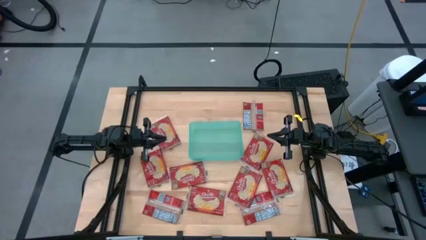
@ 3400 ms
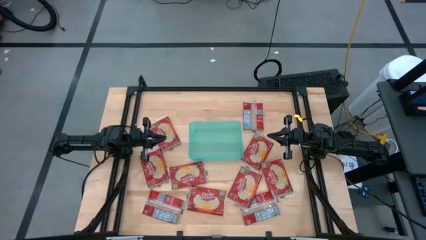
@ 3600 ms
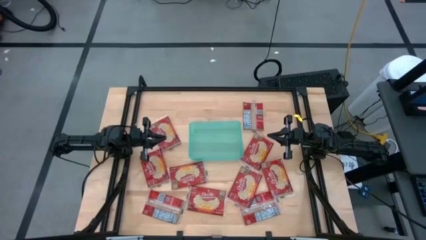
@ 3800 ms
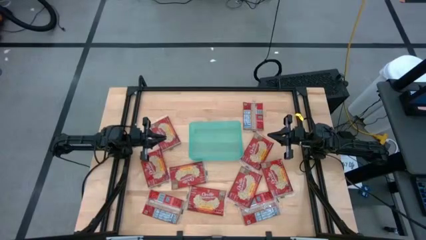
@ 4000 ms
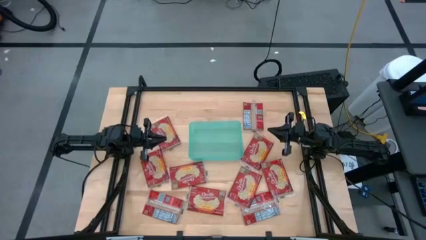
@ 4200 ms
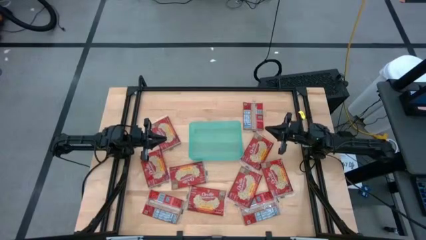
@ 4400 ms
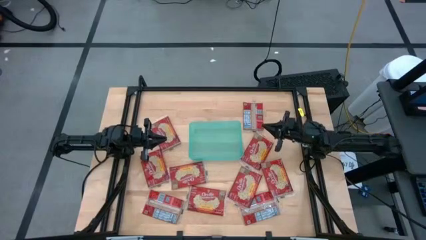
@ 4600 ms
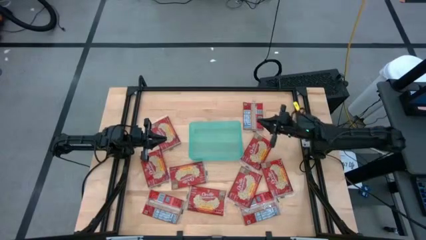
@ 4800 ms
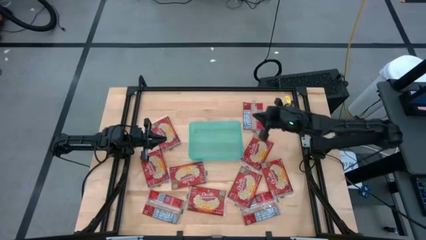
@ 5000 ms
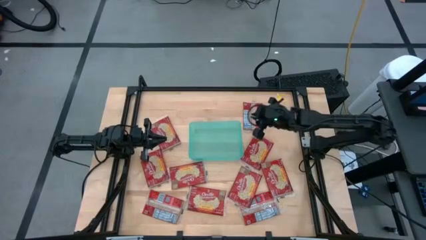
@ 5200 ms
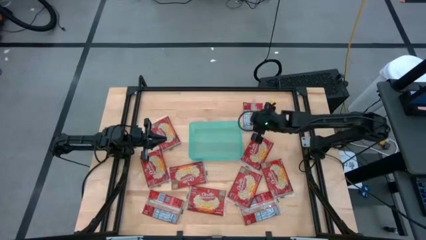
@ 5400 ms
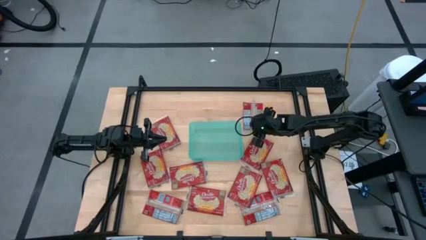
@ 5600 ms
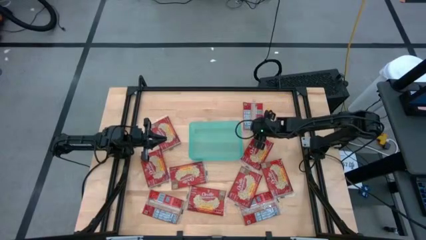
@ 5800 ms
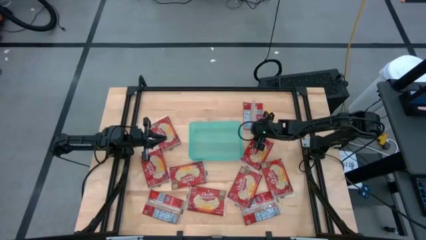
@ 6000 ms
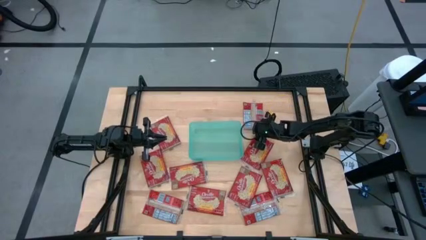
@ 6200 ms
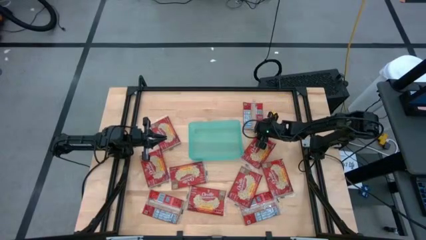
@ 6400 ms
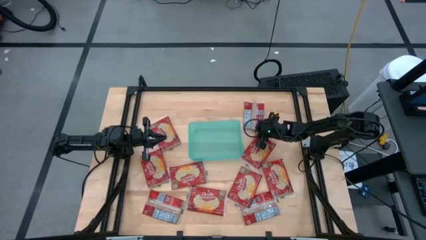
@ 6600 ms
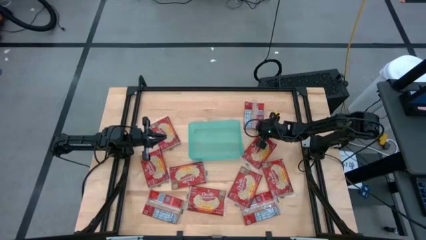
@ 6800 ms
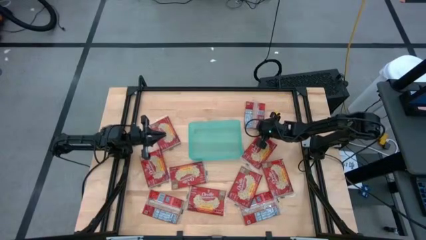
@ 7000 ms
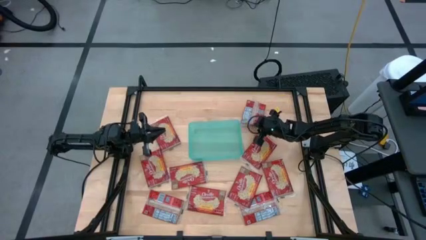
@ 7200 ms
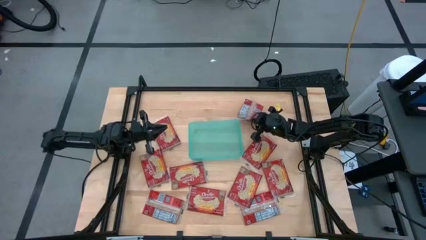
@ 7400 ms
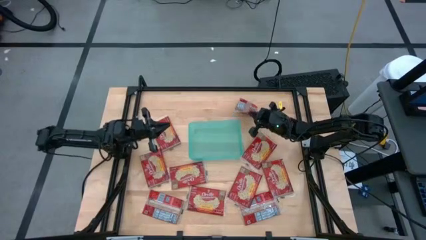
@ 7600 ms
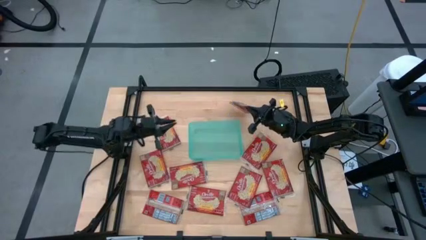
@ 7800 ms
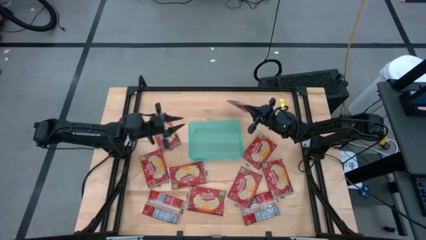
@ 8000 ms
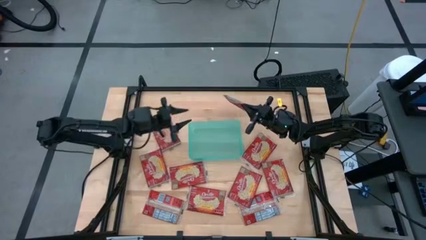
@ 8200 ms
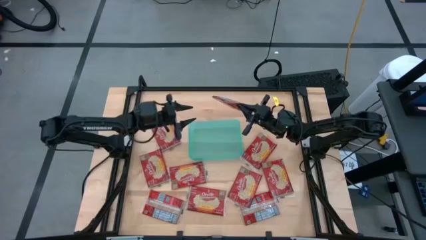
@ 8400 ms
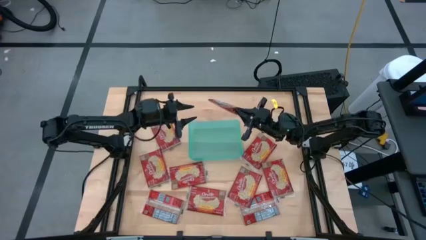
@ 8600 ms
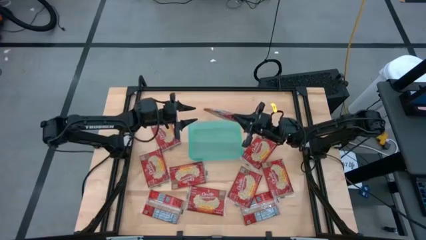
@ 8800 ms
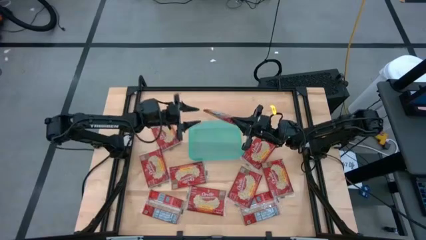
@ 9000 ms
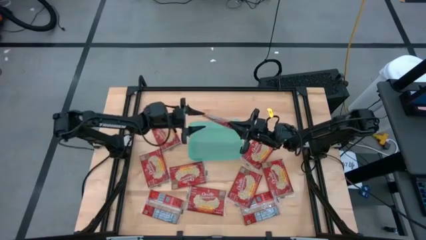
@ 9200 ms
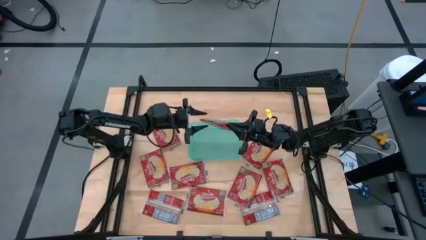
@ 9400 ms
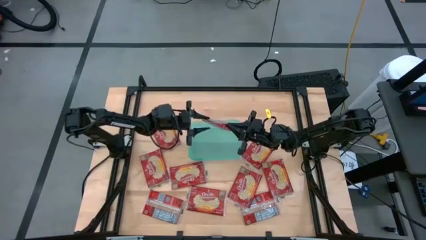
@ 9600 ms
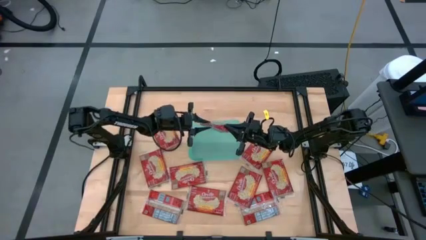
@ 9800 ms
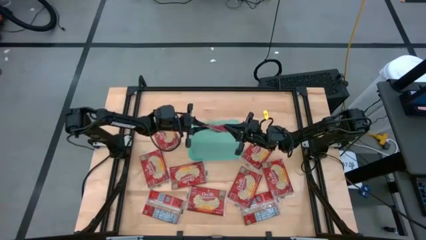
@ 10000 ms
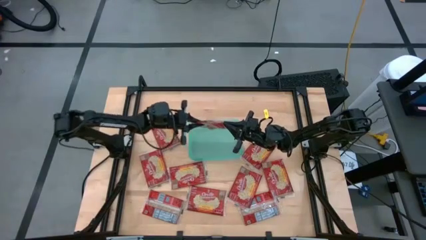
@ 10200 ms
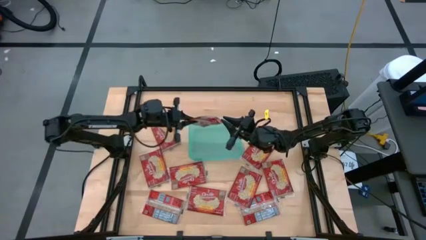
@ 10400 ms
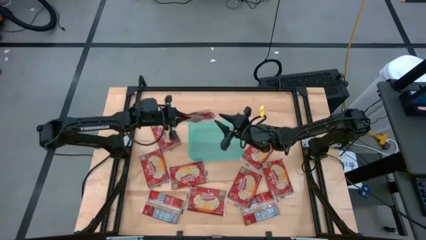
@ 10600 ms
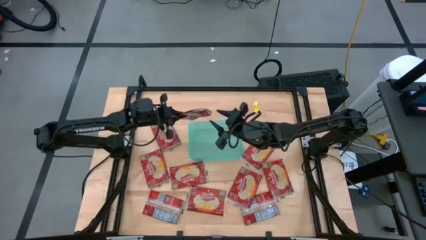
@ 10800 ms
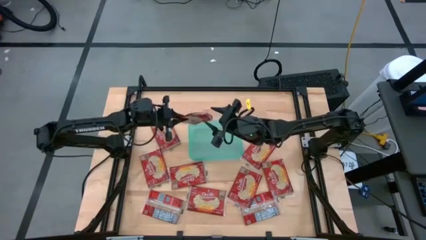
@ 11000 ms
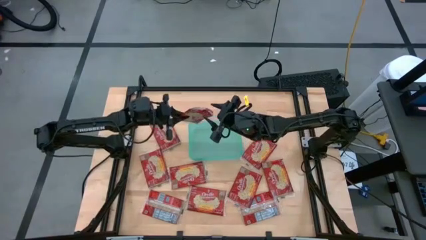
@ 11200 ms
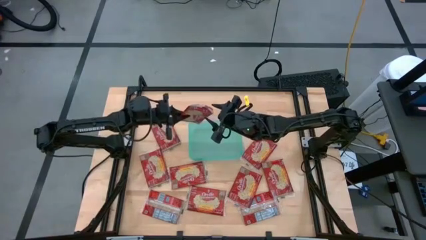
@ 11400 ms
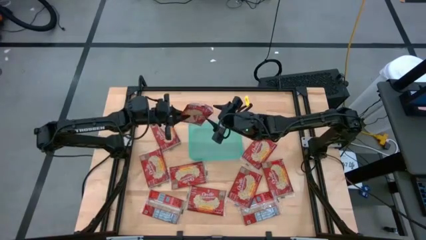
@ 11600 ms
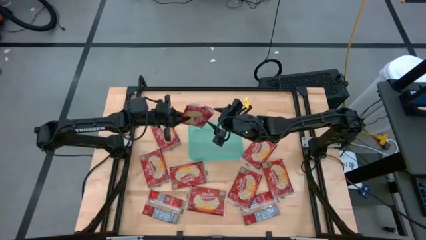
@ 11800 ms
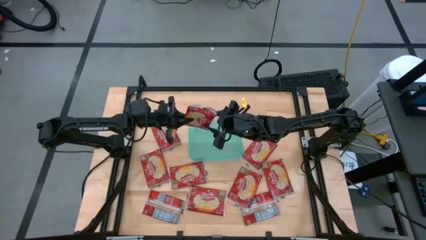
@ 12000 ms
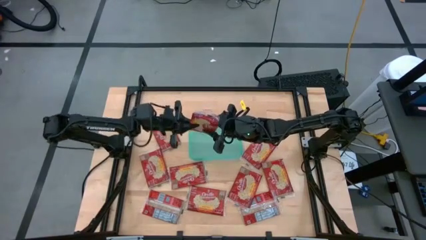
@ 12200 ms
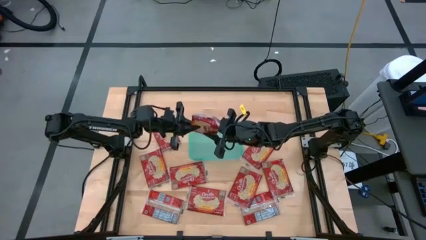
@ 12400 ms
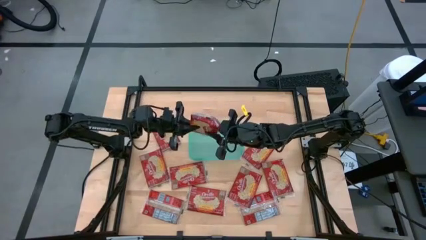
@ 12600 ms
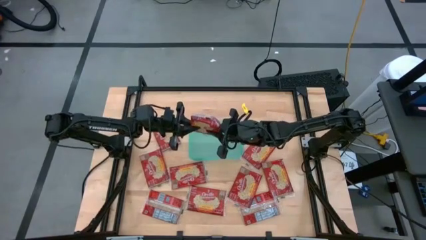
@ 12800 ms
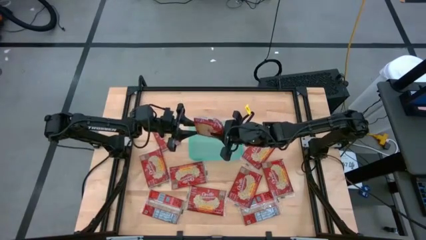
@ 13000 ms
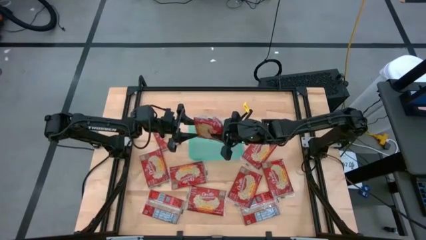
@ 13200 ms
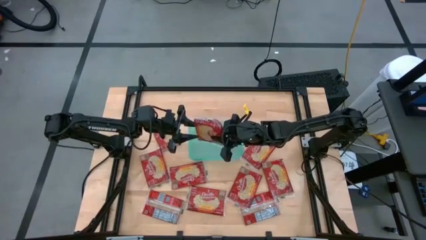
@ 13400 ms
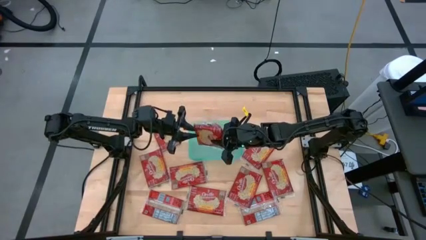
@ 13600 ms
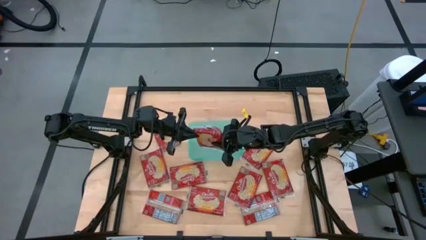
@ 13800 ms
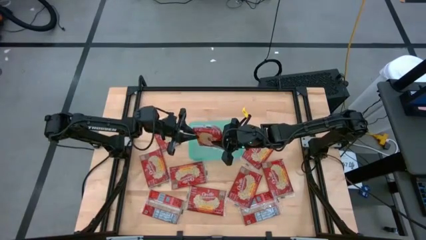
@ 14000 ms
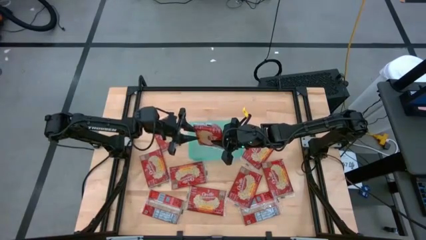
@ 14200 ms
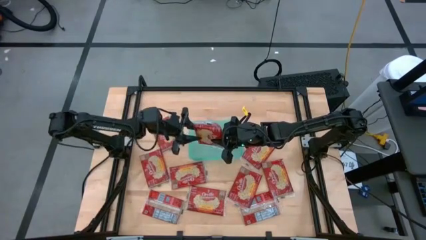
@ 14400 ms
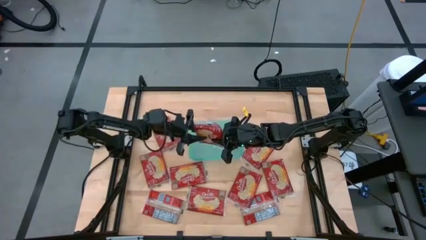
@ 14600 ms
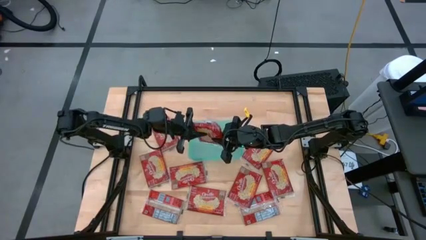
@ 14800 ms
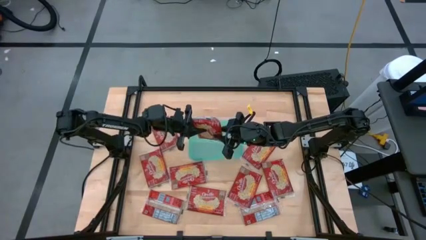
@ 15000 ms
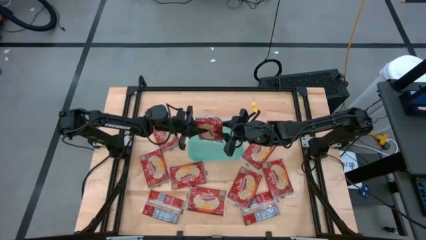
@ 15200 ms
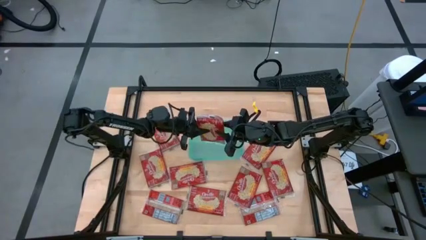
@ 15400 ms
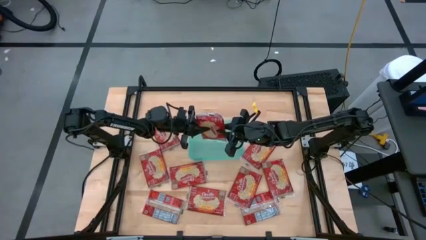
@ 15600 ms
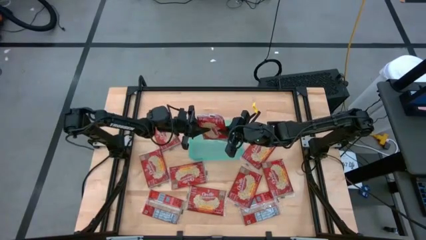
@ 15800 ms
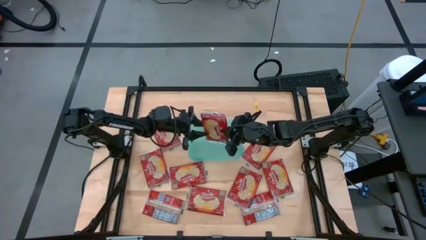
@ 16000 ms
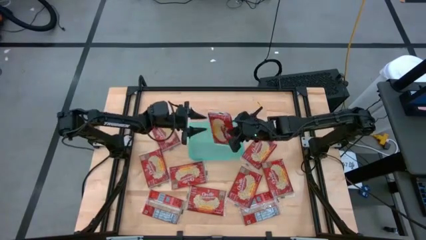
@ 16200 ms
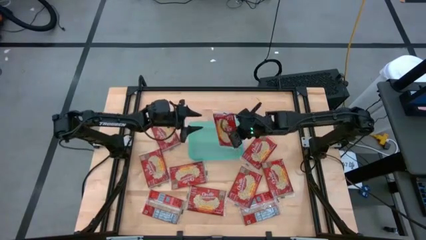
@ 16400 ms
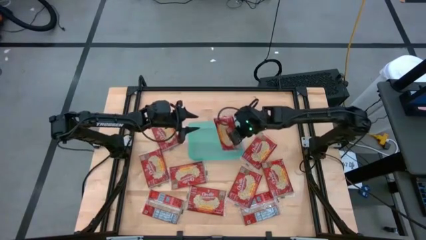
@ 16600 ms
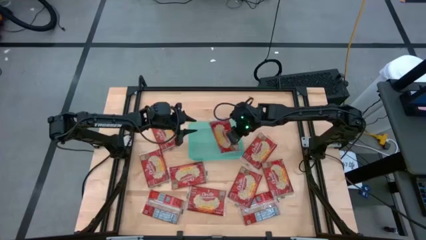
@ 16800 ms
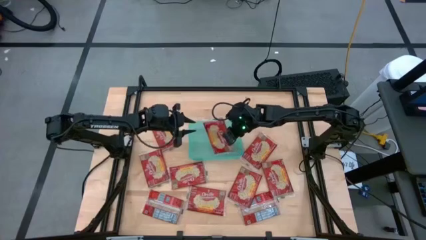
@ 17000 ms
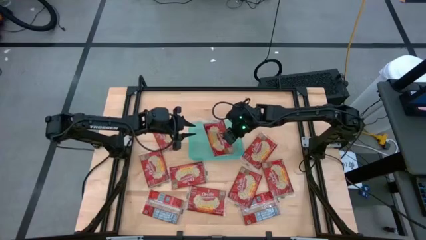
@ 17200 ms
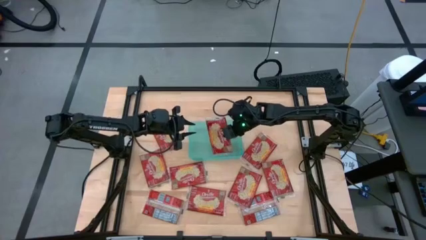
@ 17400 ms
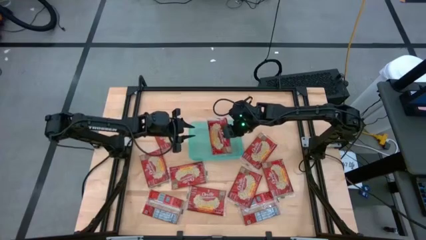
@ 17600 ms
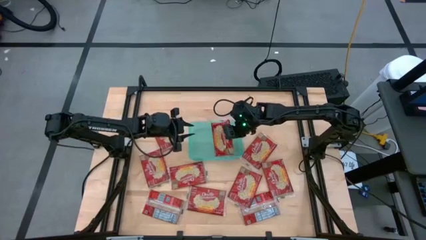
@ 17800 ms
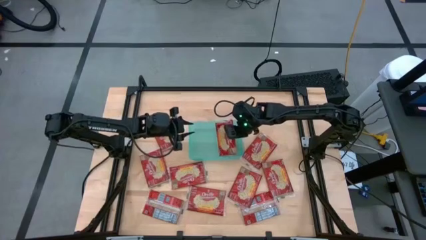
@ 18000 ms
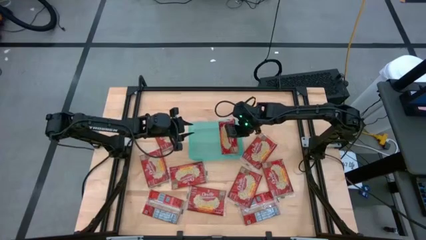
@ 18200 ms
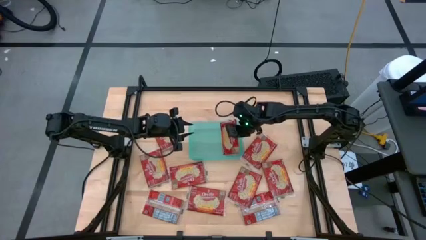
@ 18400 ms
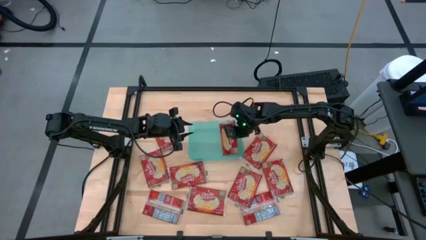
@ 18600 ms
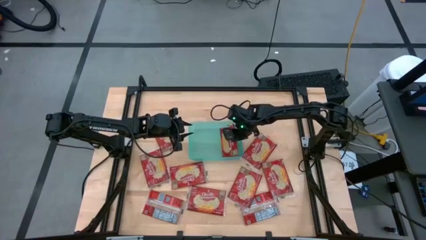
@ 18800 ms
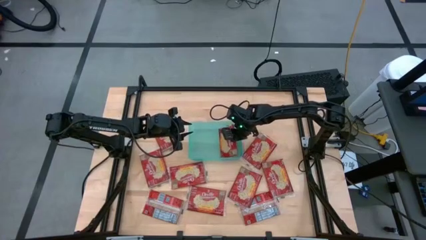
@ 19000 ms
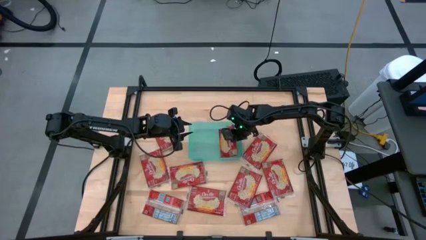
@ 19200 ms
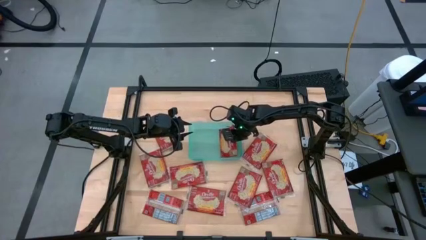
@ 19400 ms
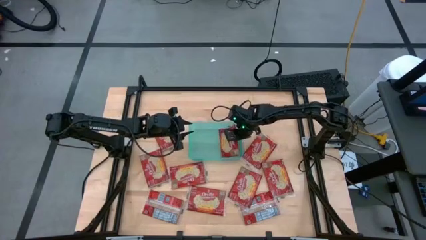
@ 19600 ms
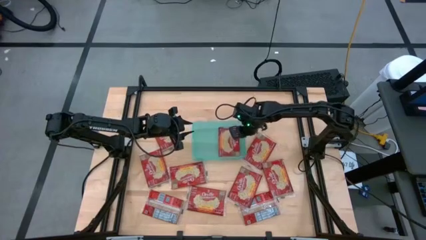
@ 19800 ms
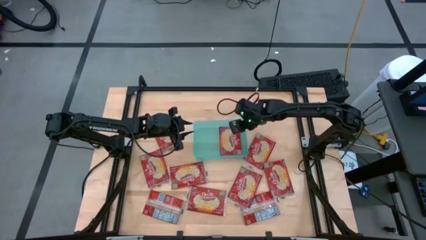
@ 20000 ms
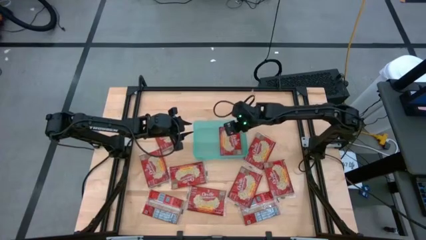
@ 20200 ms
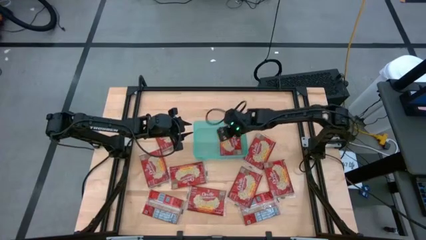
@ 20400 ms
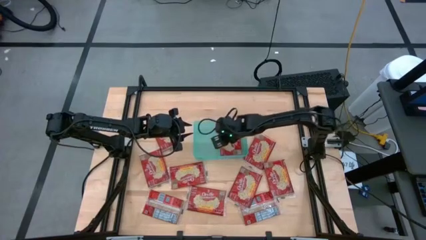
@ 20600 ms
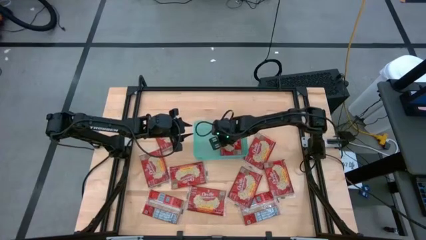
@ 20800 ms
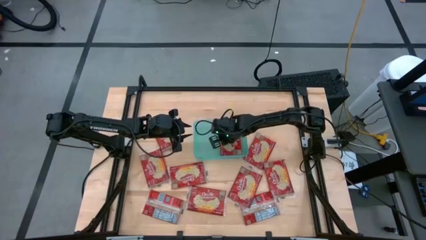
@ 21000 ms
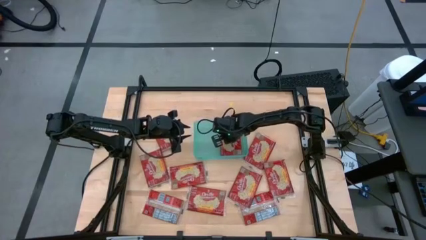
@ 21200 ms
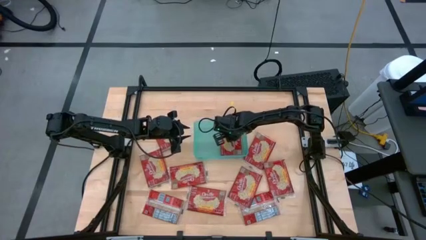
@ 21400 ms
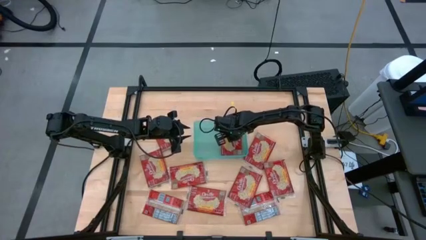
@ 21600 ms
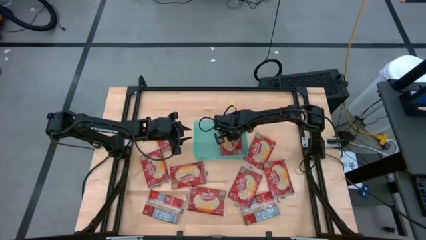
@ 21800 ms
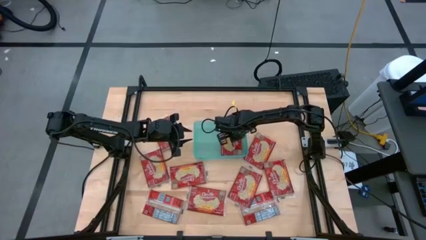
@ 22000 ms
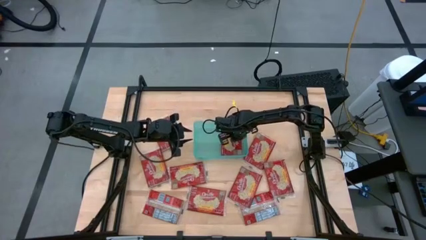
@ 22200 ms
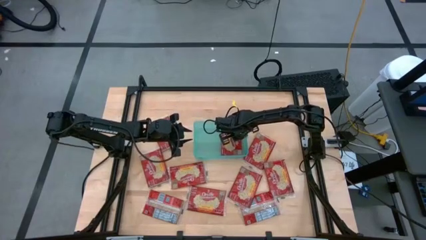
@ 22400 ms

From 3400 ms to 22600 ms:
Task: Sort popcorn bags into baskets
Put the red popcorn bag into the green bin
